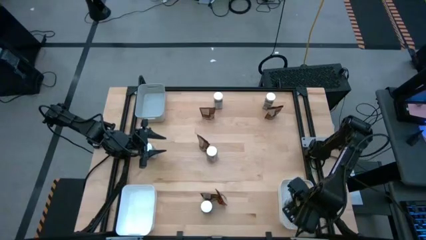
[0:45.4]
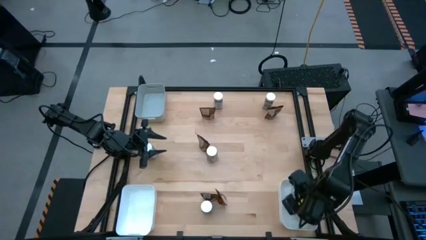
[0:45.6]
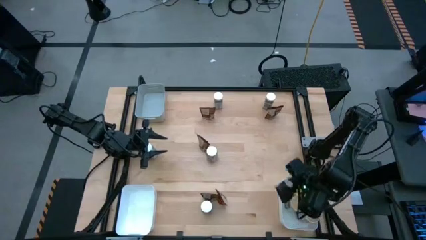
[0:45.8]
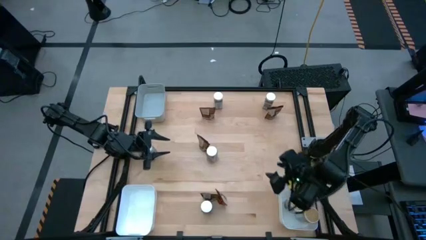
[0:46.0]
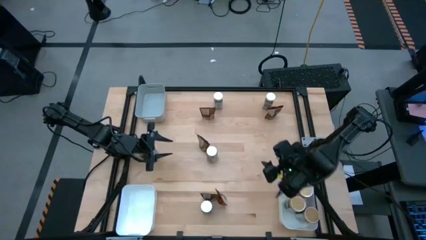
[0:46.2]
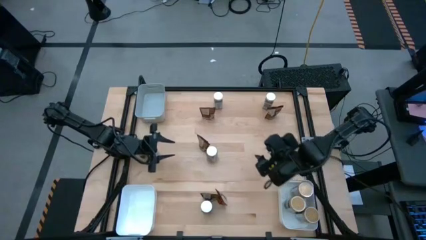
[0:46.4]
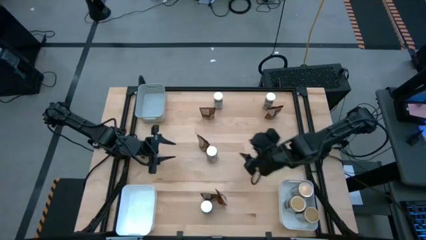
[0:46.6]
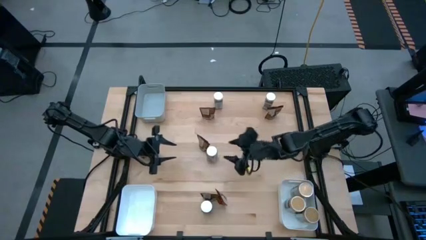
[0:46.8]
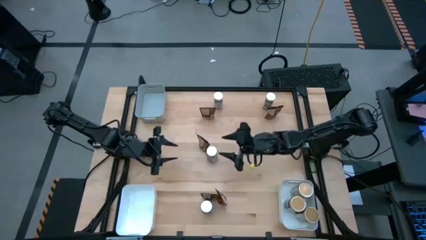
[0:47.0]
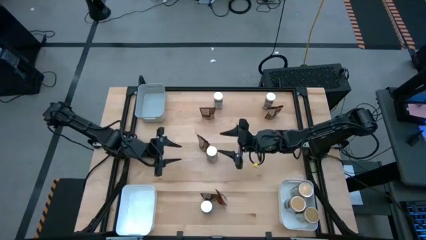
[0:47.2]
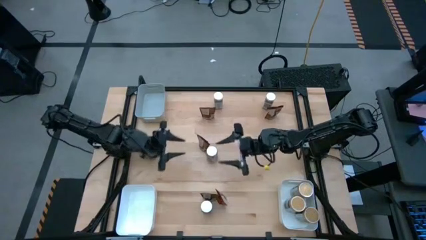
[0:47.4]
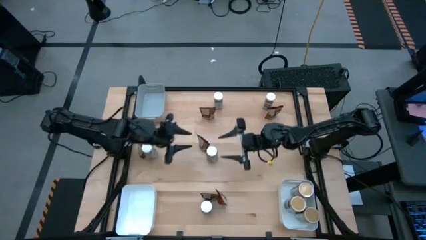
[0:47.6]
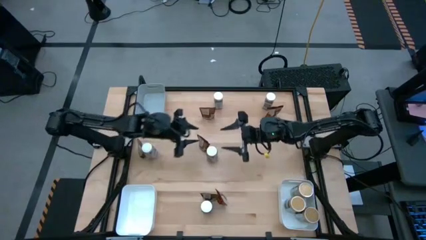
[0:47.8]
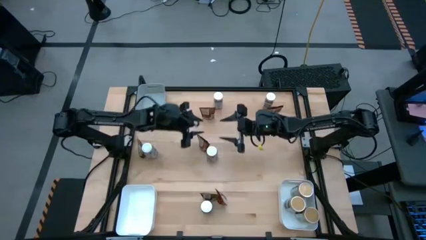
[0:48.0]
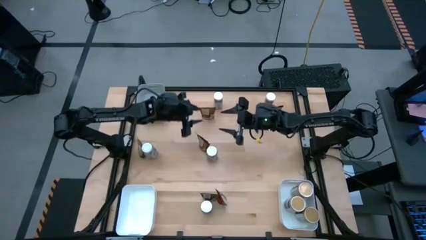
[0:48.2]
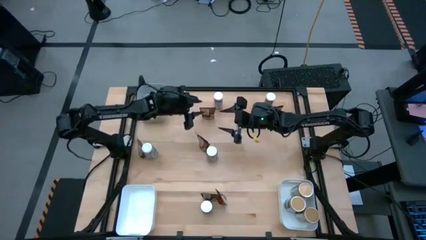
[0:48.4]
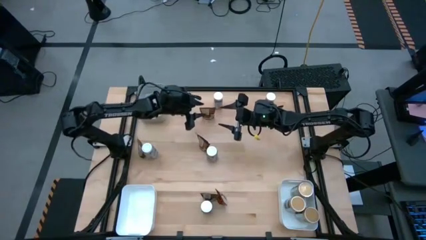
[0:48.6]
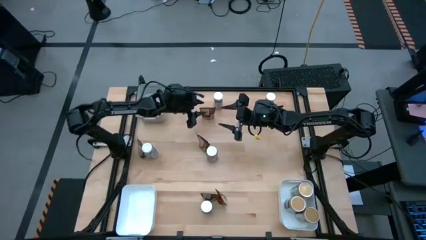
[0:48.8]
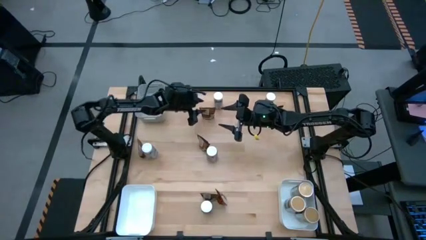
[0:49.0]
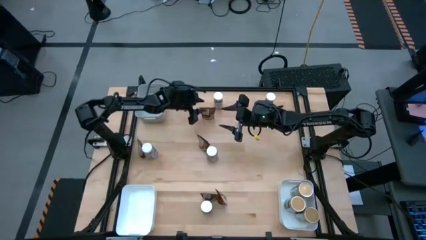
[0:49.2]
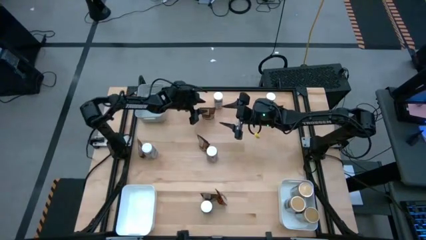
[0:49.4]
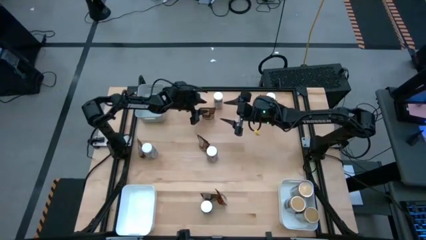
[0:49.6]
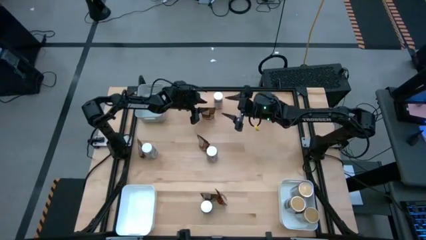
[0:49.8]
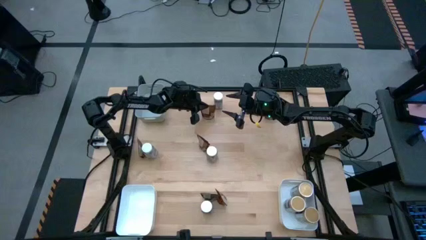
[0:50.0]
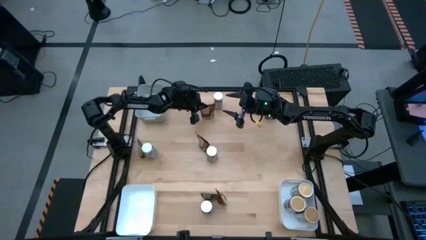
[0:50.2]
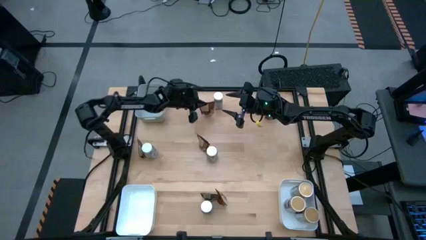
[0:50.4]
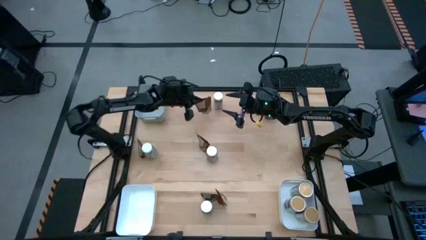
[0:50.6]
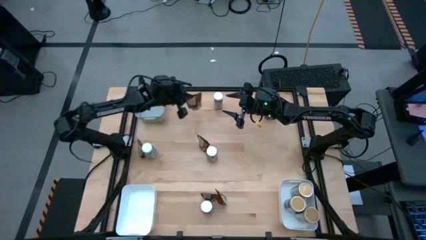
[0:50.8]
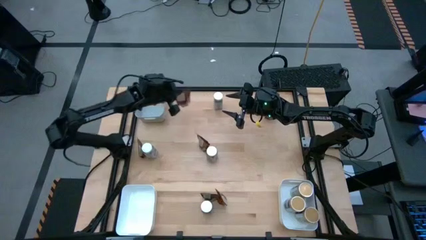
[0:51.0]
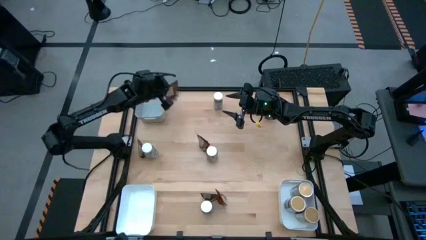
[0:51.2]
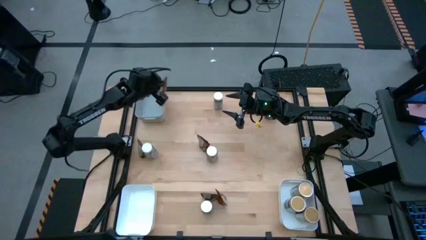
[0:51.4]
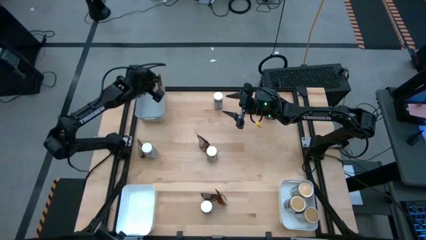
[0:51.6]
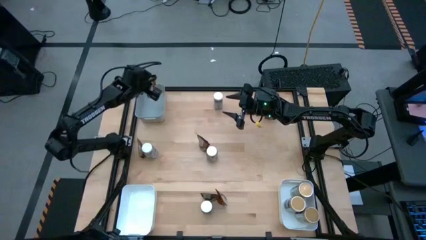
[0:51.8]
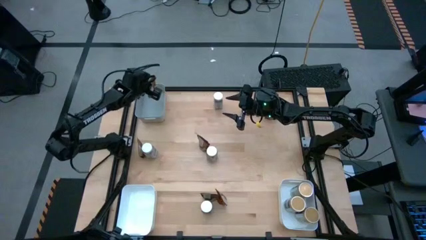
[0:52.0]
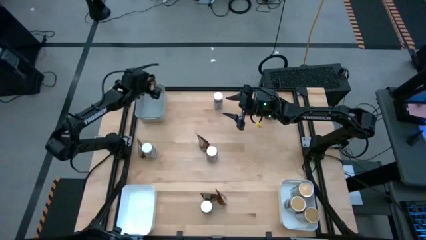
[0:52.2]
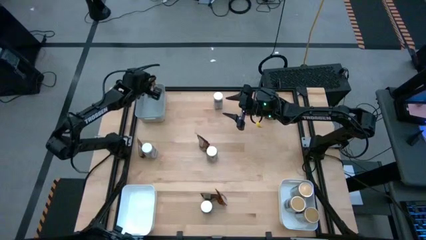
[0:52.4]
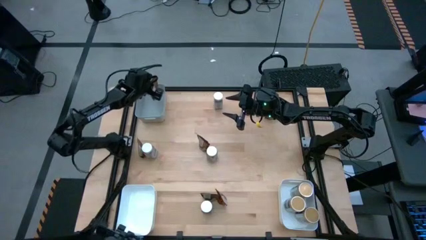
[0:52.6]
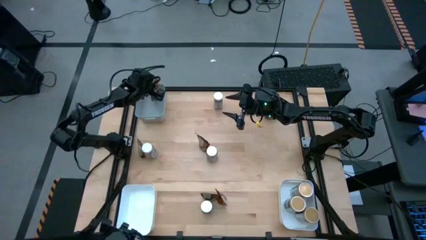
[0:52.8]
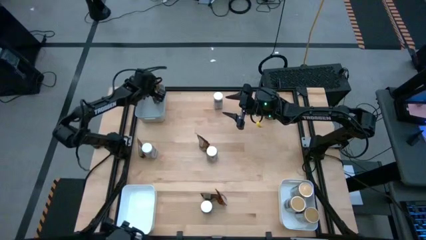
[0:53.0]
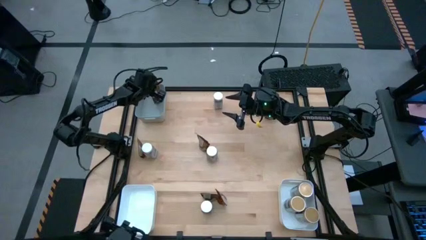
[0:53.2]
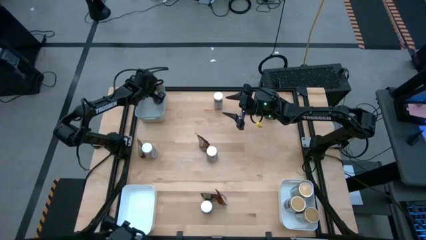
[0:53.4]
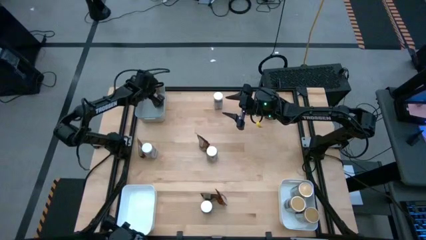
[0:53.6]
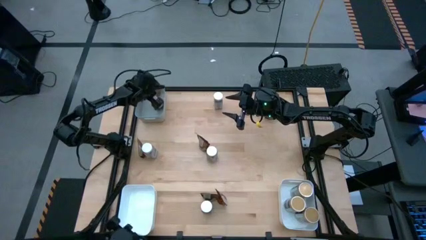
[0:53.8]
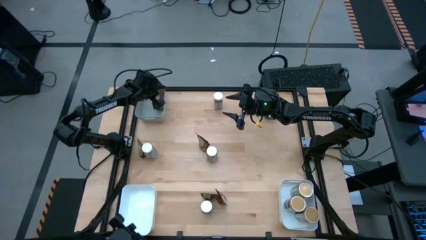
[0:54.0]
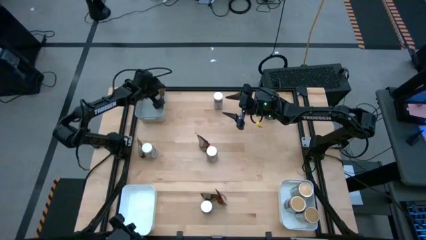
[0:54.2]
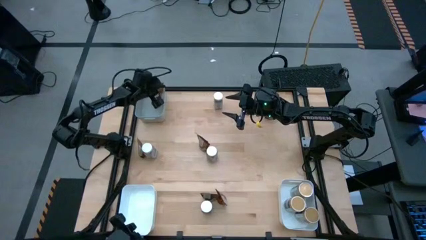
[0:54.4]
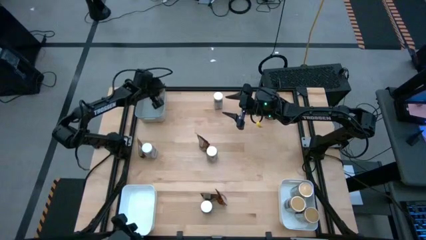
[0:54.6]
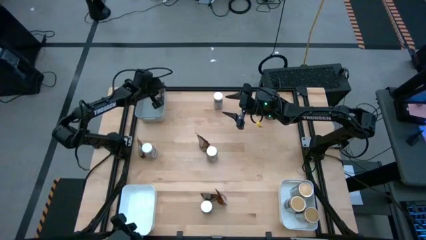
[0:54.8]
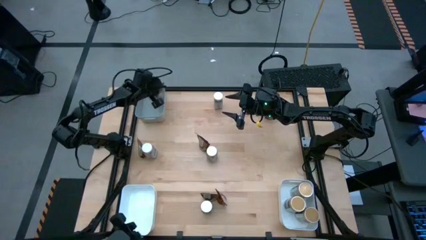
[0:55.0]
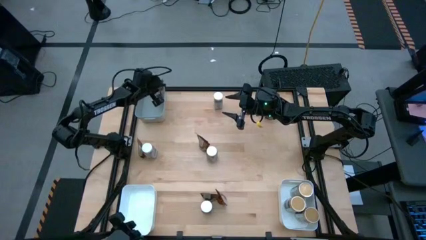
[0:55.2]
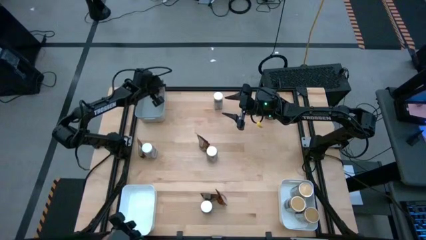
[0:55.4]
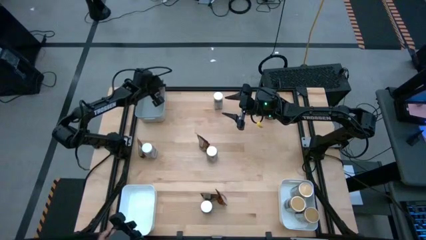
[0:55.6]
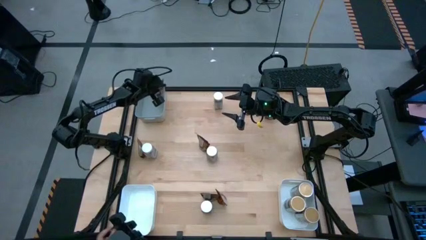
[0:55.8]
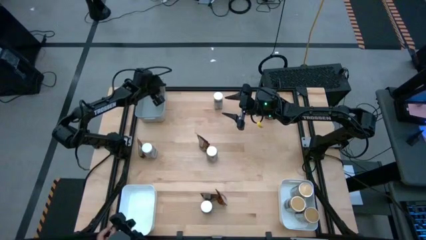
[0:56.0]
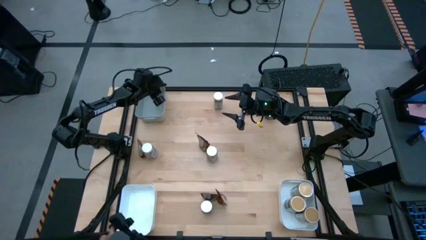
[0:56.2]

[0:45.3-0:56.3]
Task: Sort spices by type
Put the seasoning bag into the top left white bin

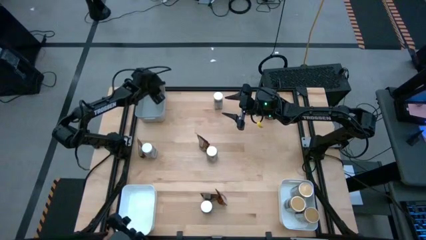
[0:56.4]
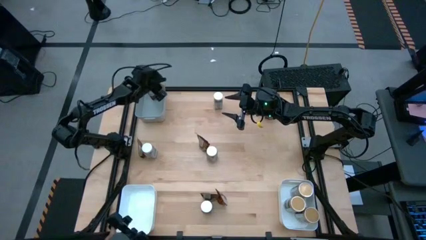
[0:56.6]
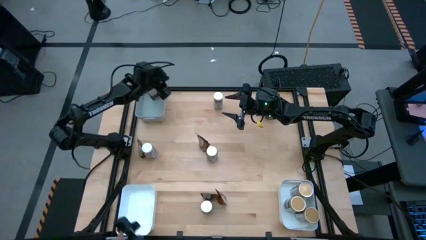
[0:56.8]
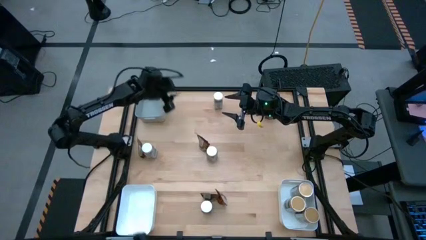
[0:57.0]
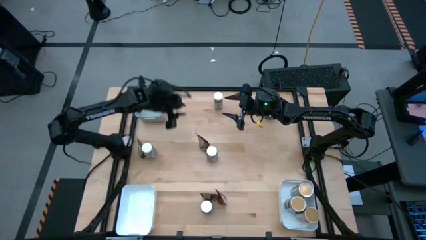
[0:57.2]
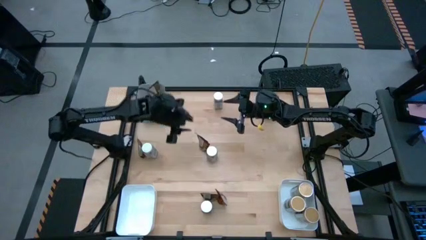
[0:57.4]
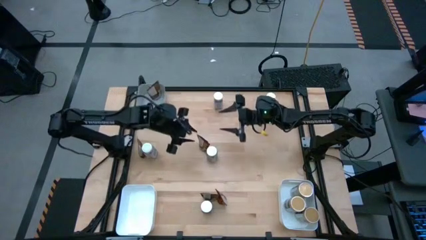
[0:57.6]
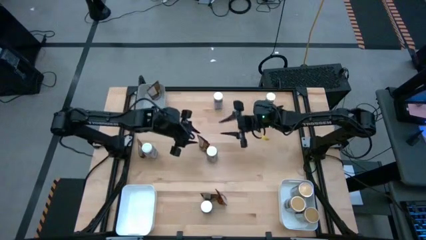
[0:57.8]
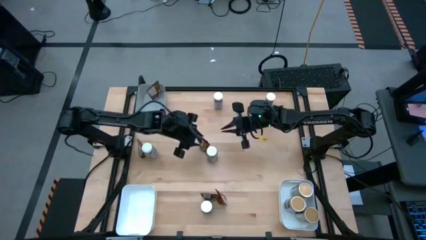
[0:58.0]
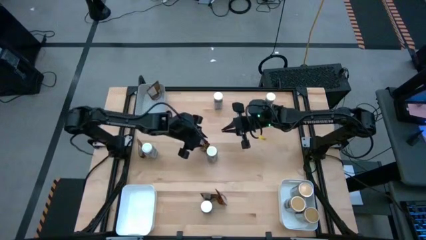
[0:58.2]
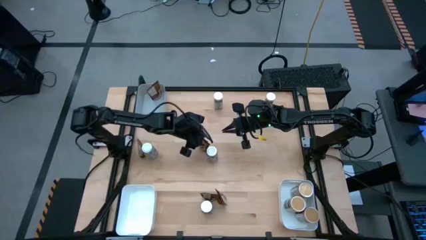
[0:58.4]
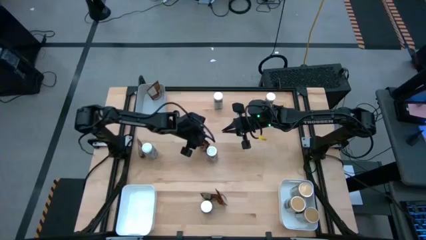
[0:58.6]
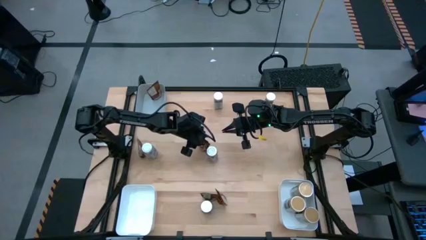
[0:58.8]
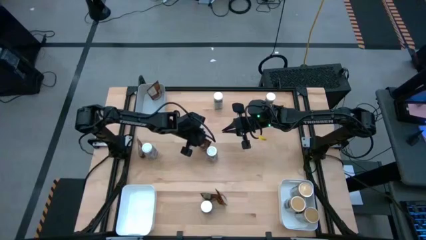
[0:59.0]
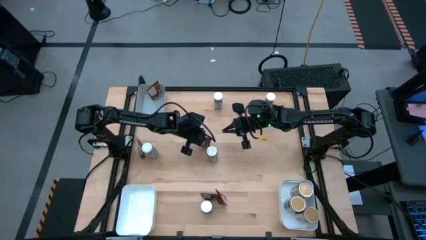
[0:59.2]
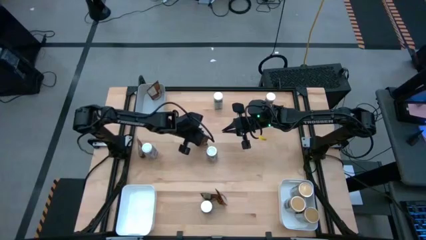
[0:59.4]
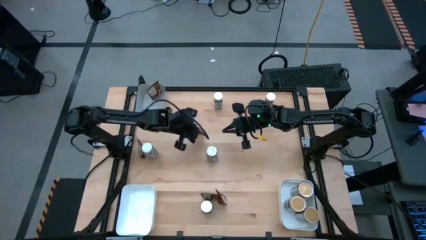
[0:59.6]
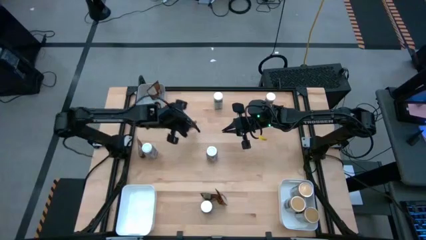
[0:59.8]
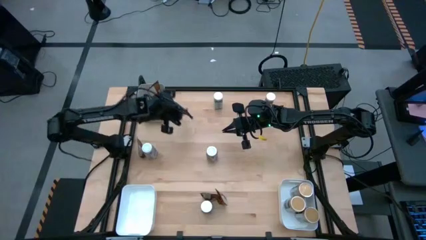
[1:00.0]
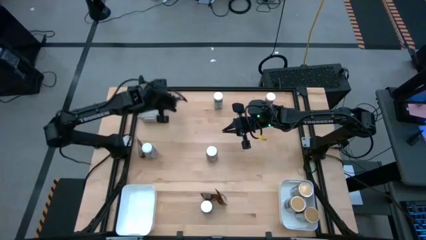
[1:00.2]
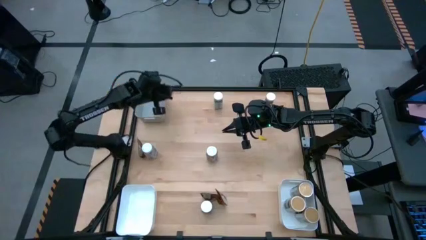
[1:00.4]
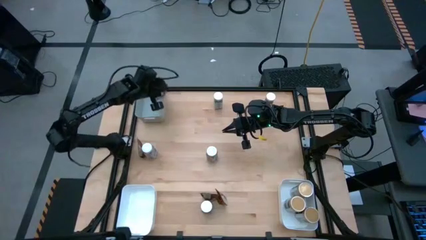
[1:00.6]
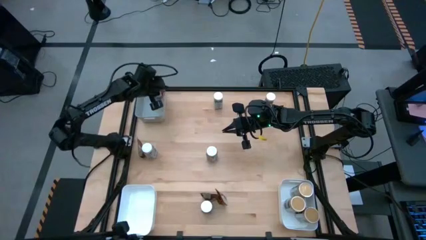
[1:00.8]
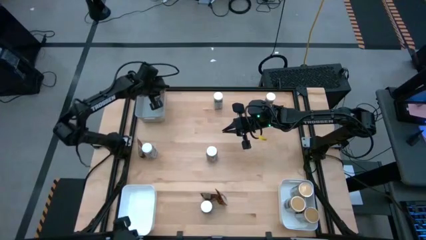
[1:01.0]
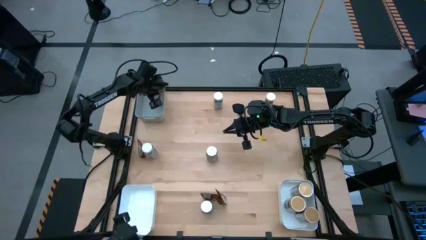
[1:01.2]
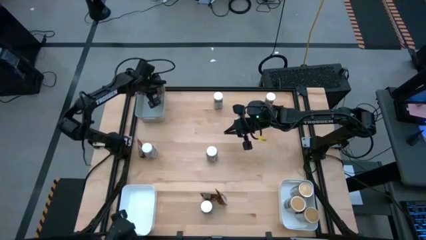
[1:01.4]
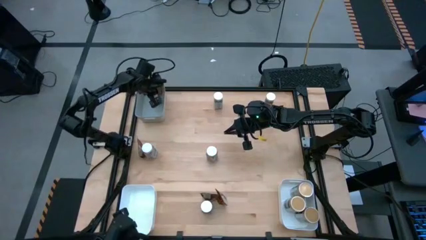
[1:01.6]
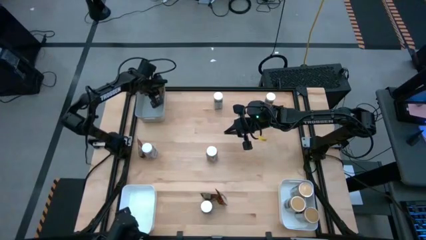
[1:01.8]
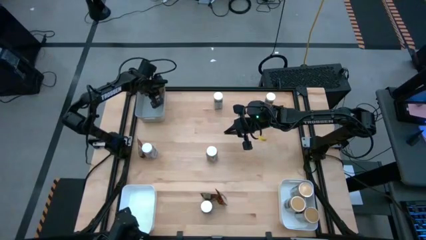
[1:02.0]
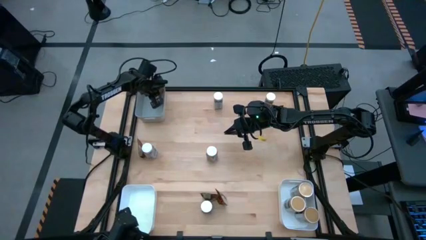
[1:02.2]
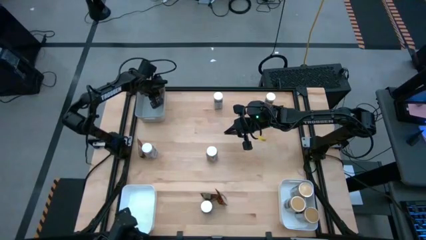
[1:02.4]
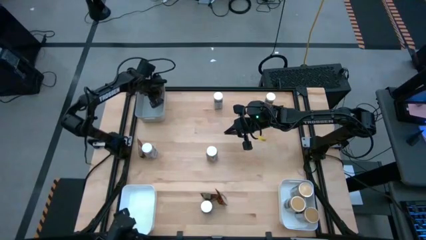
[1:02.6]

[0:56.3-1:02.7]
Put the brown seasoning bag into the top left white bin
